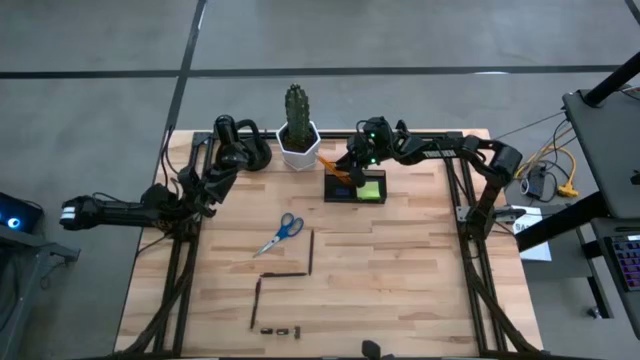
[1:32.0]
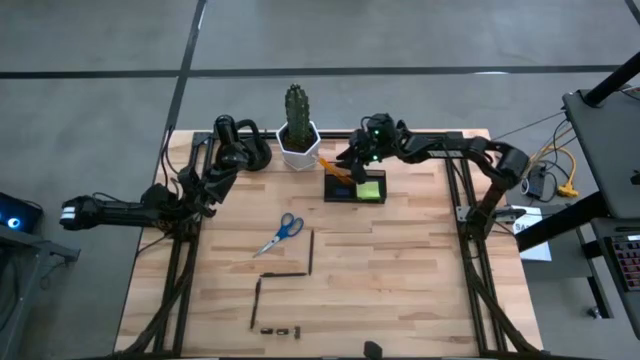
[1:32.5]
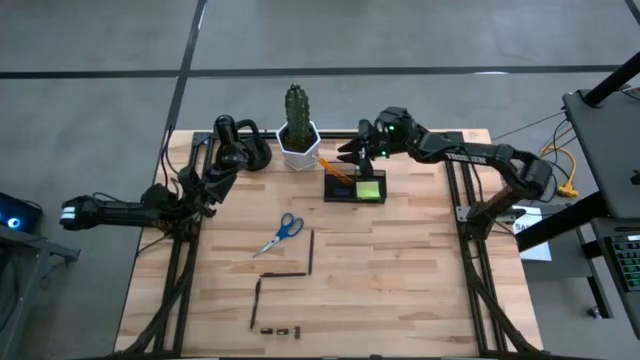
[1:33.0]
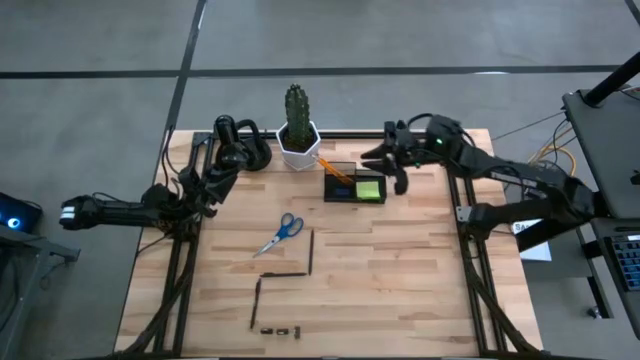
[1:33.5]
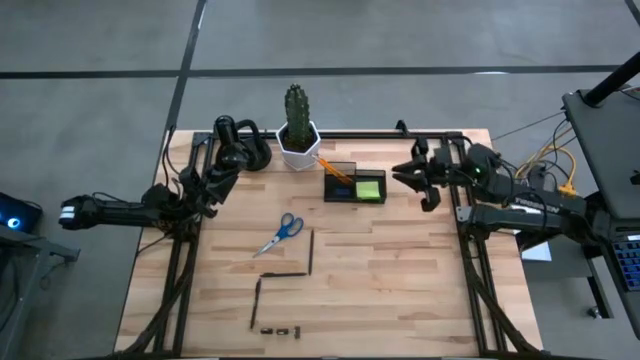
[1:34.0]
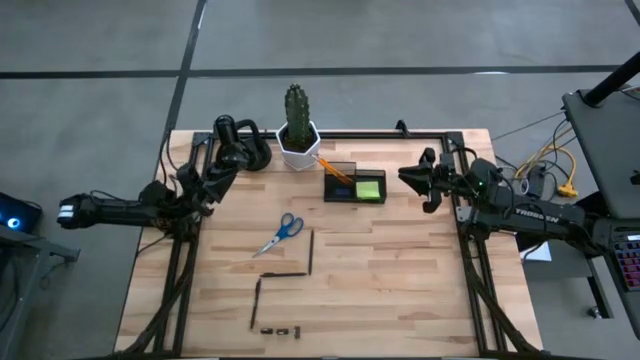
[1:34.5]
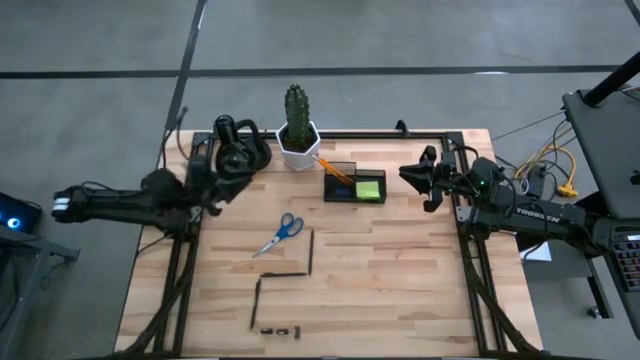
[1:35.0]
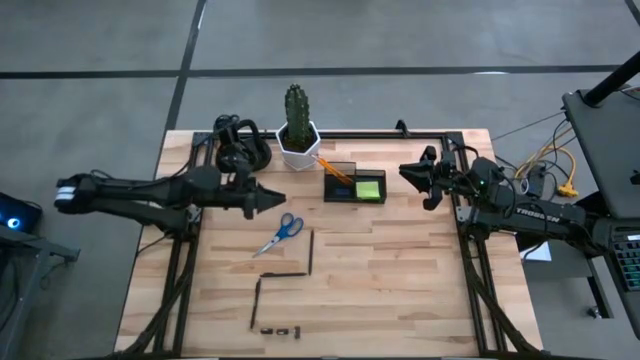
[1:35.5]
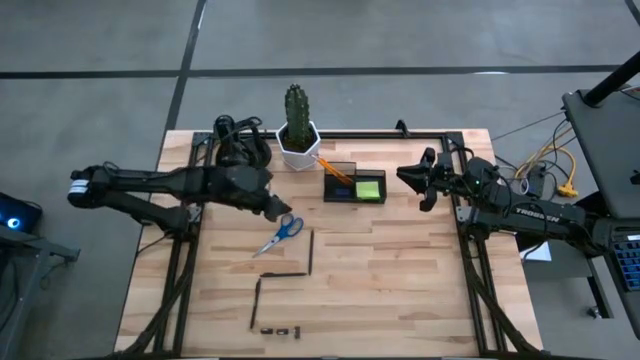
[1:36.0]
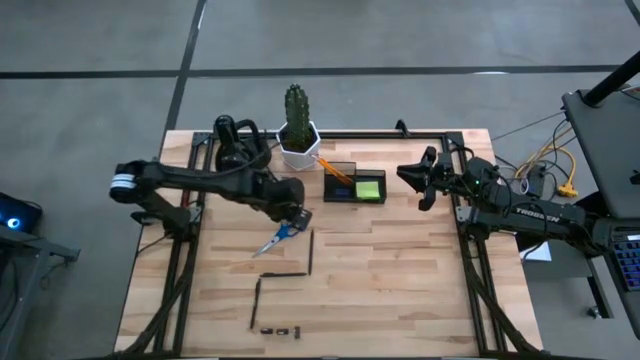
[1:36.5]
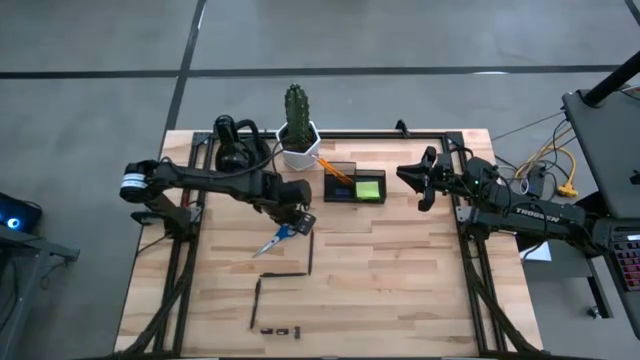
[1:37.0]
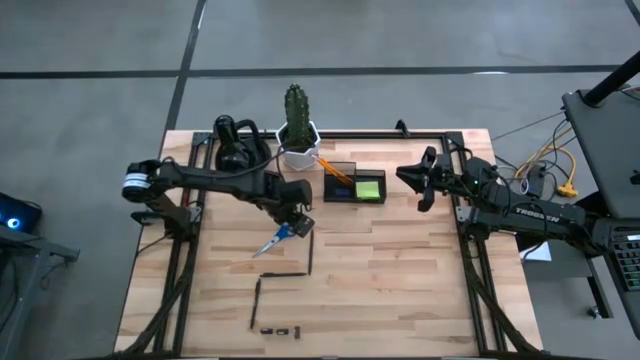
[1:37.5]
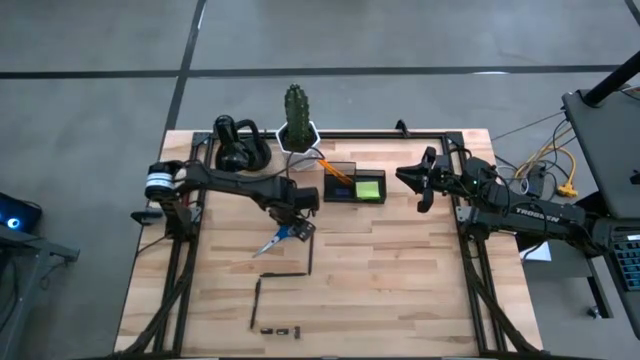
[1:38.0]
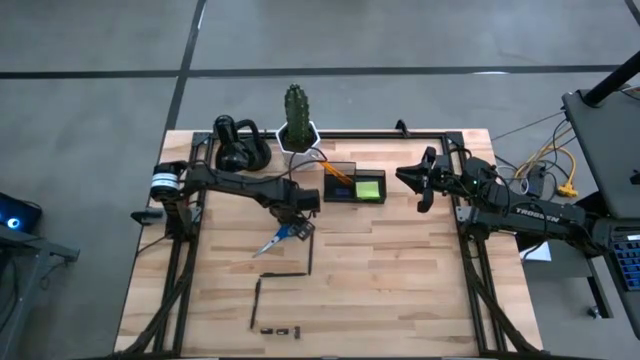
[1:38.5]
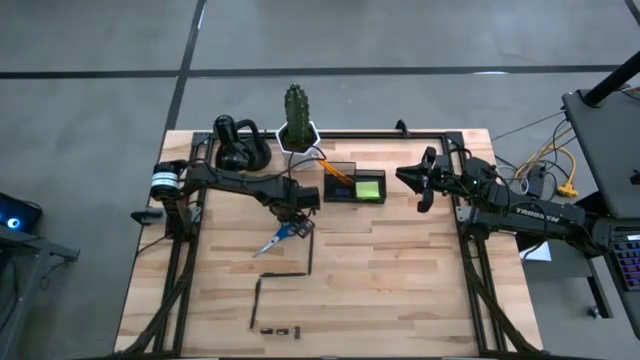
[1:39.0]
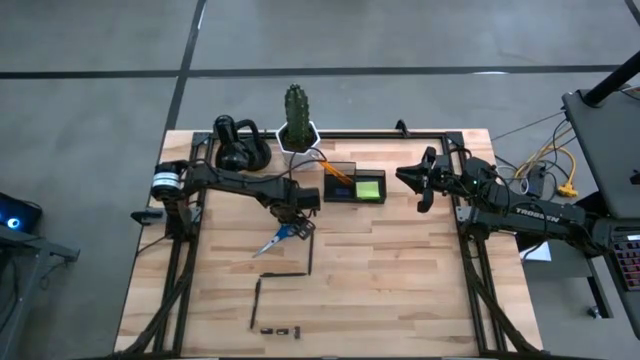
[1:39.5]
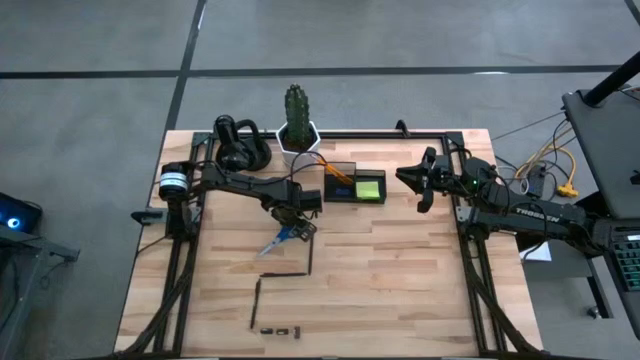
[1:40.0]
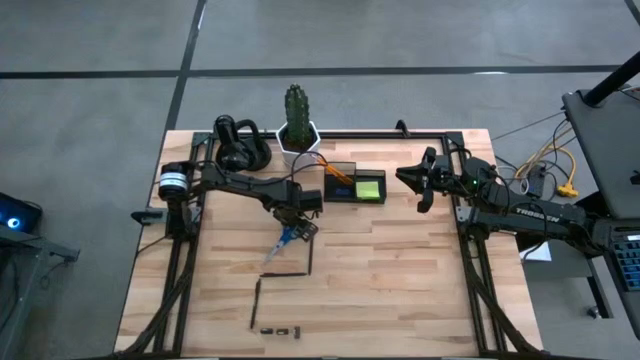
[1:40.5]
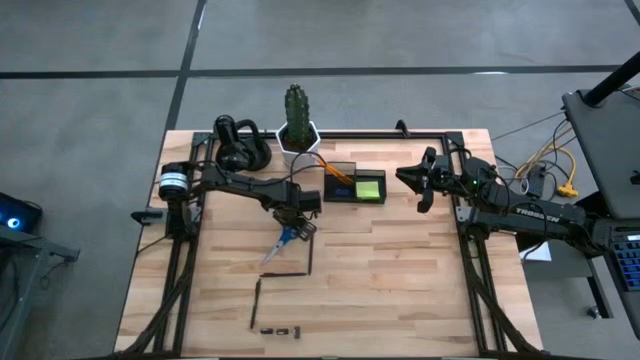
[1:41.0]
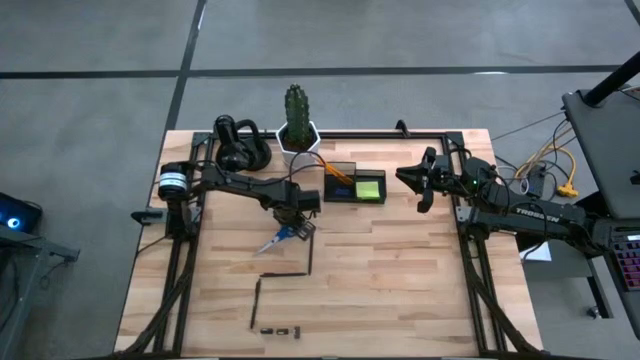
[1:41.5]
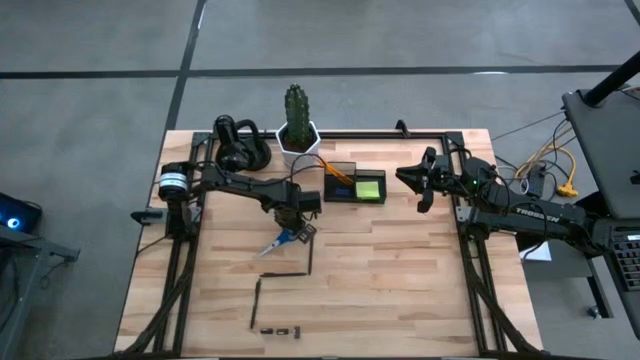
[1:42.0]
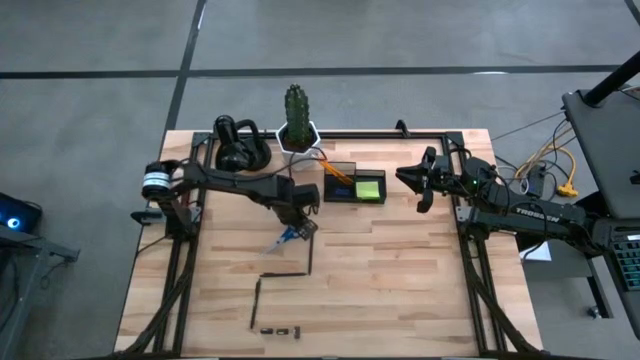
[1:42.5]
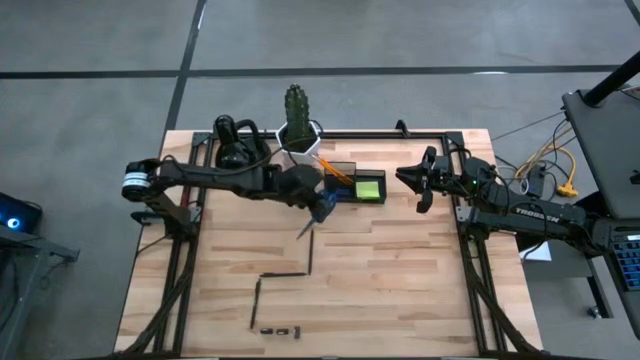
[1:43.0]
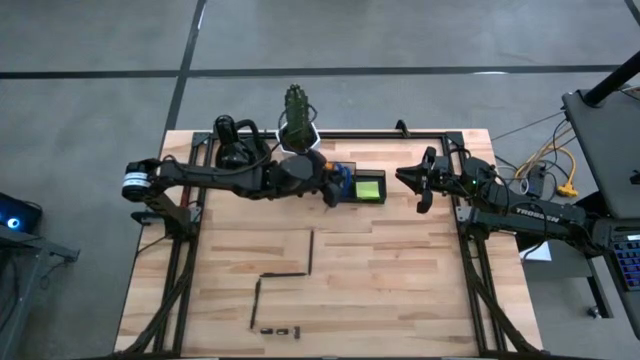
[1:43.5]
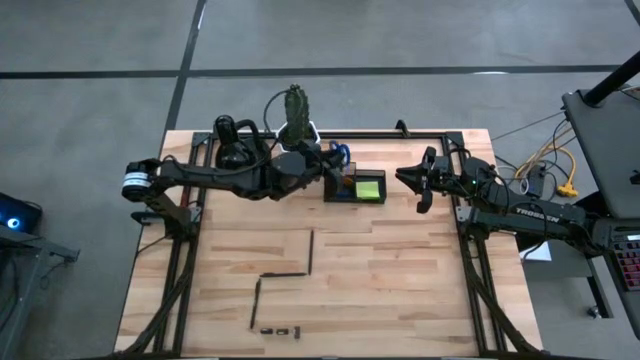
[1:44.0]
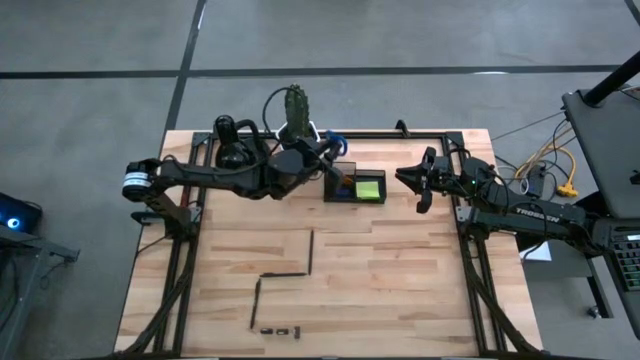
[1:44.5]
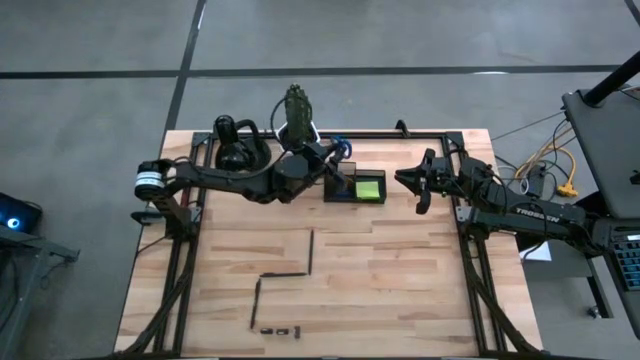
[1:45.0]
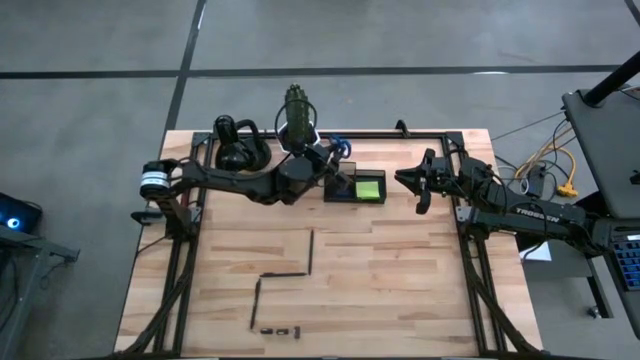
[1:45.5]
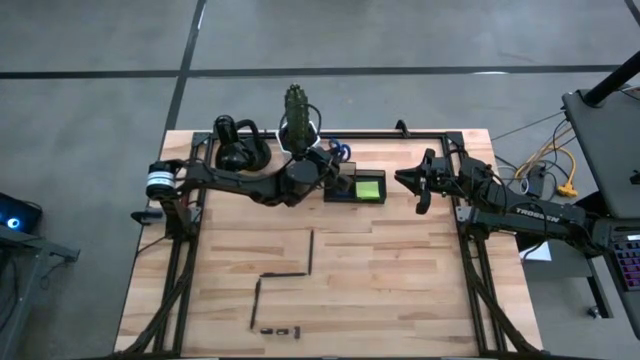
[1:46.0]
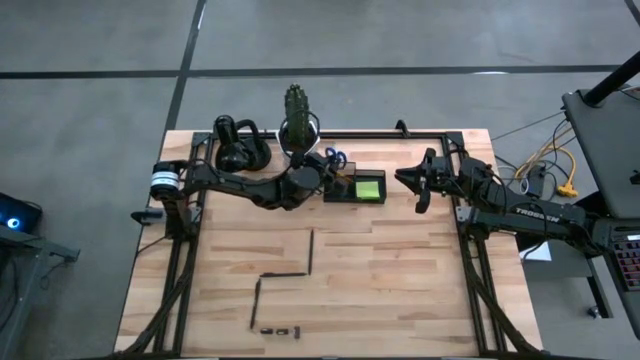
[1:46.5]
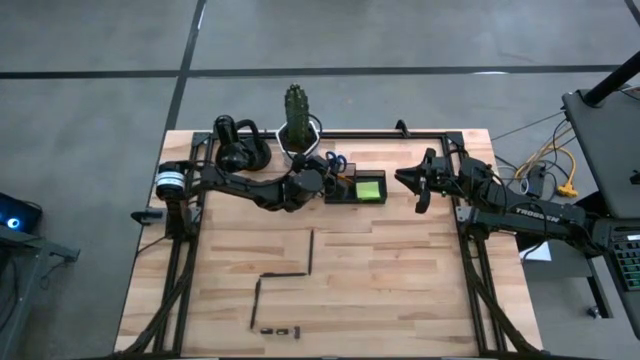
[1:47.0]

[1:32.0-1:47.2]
Task: Pick and place office supplies into organizer
Put the scissors into the left section of the desk organizer

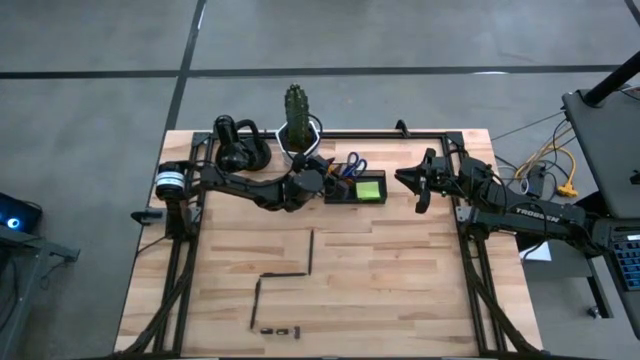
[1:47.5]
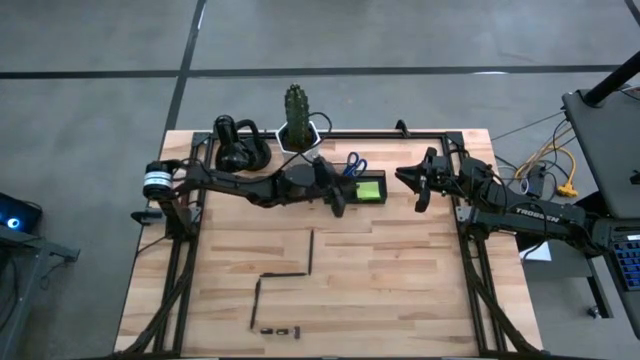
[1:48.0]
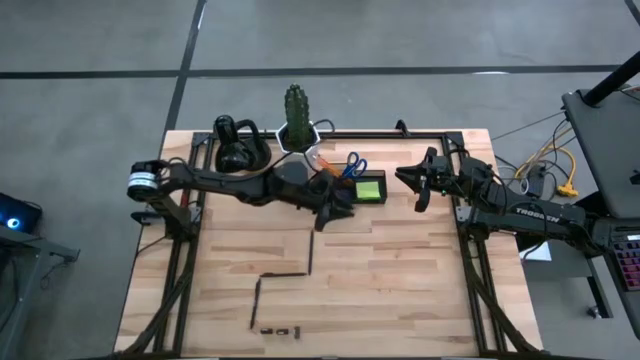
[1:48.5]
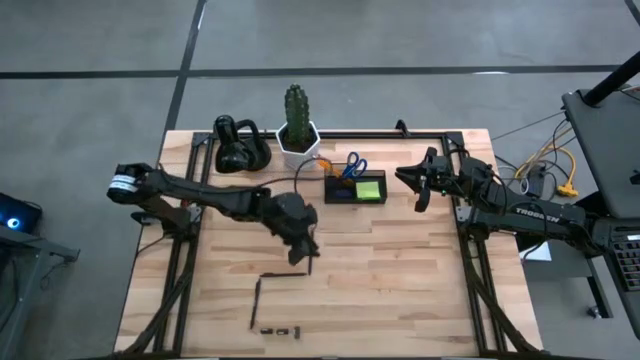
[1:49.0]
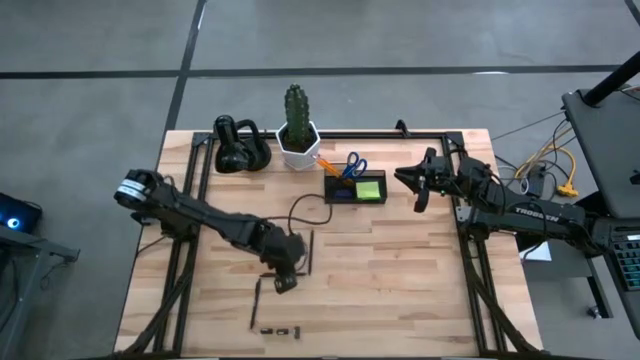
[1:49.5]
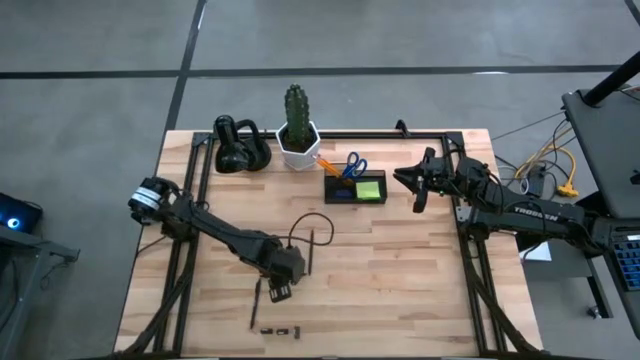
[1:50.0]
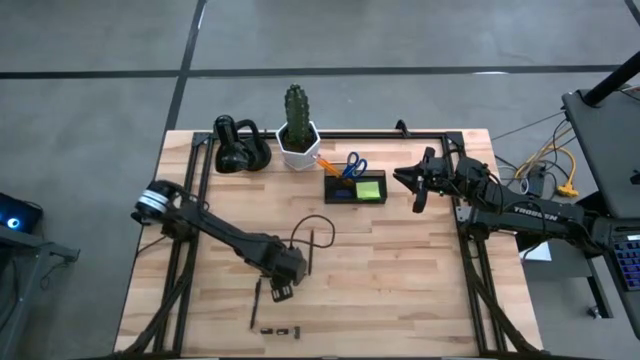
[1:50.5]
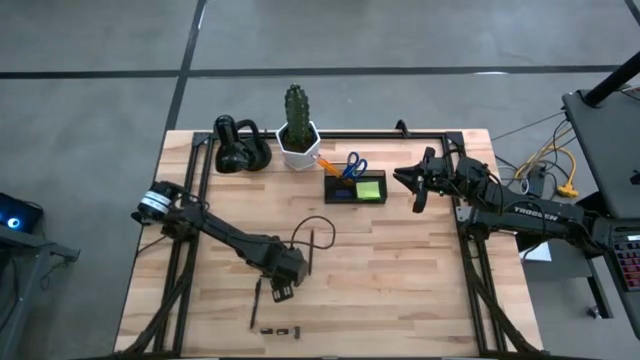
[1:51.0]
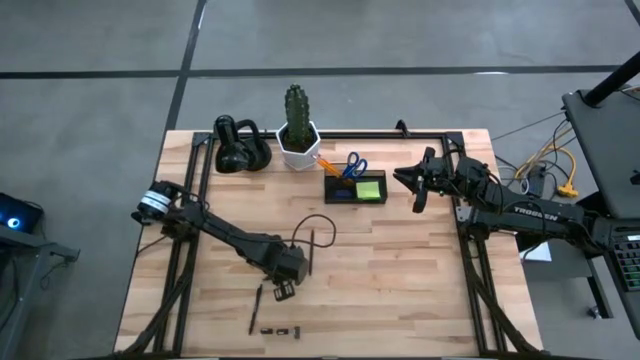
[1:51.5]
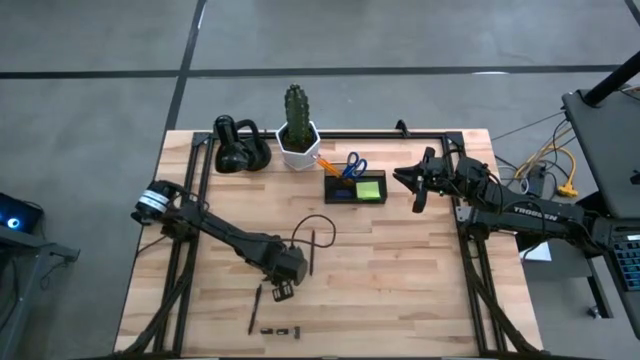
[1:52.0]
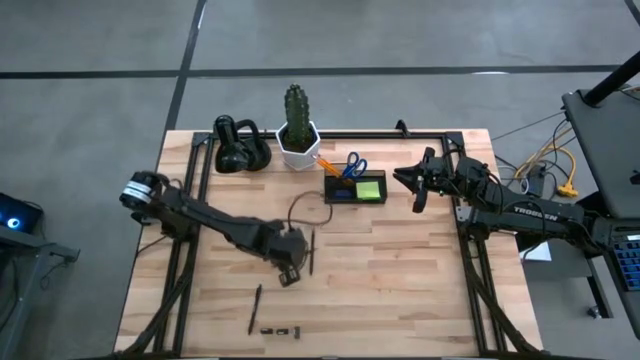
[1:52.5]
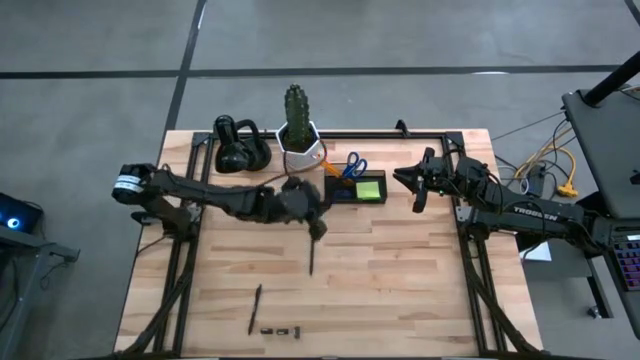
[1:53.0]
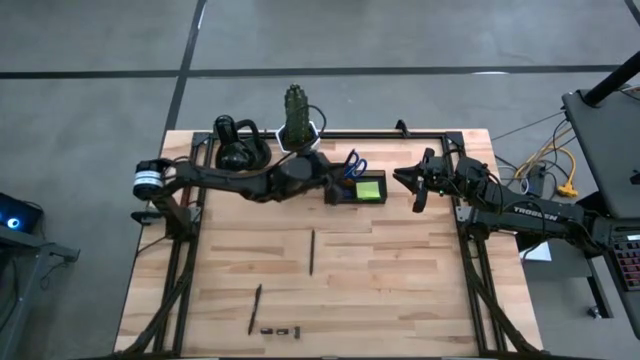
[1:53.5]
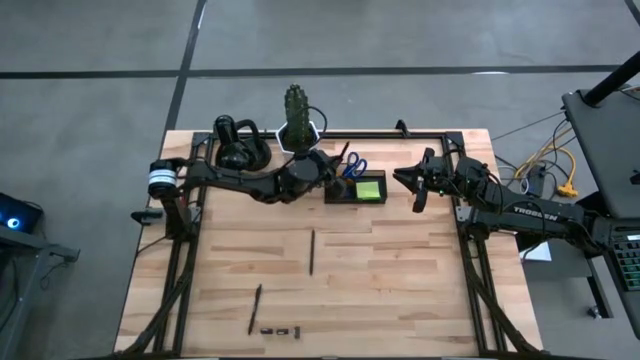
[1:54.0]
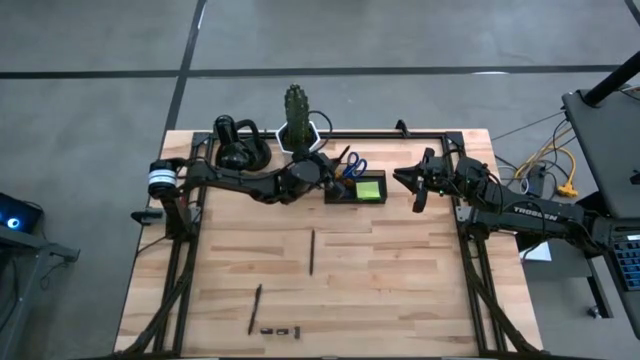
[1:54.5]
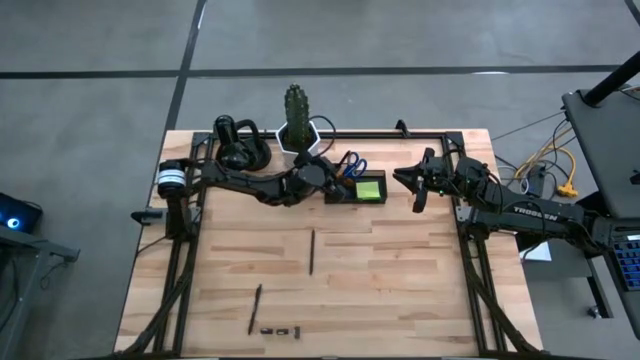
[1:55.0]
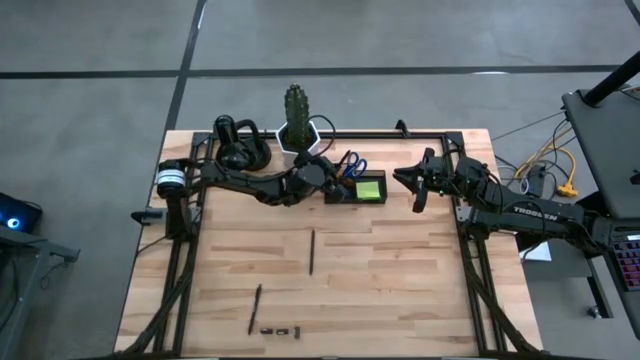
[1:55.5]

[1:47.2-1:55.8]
Put the middle pen into the left section of the desk organizer
